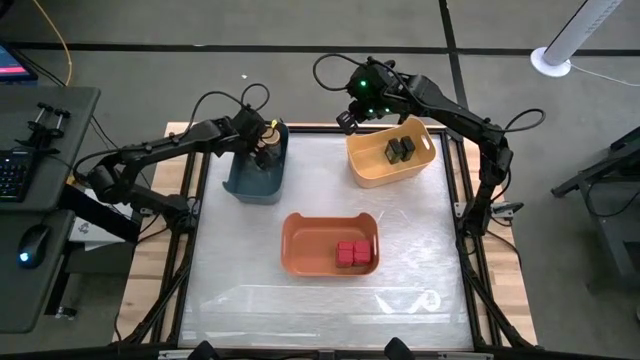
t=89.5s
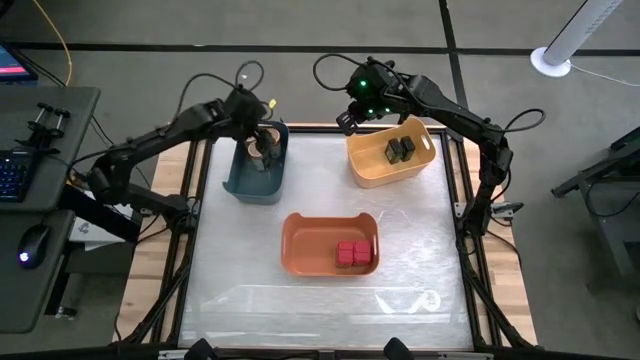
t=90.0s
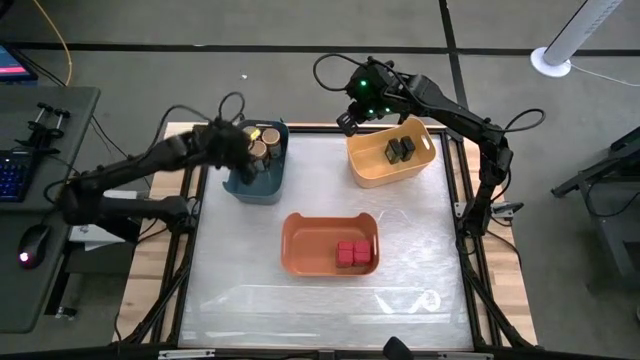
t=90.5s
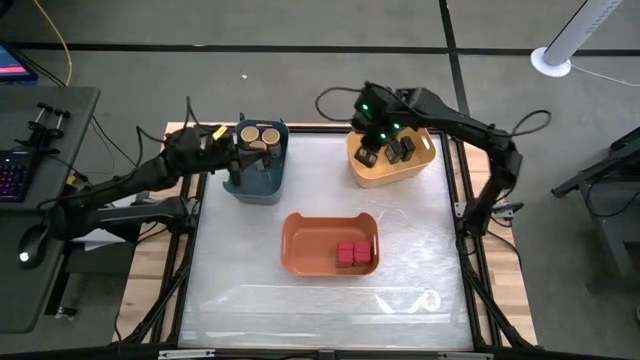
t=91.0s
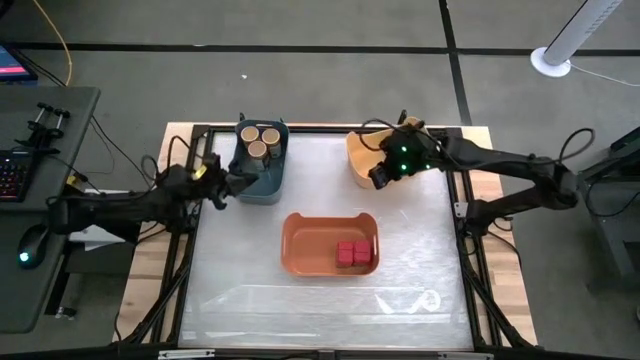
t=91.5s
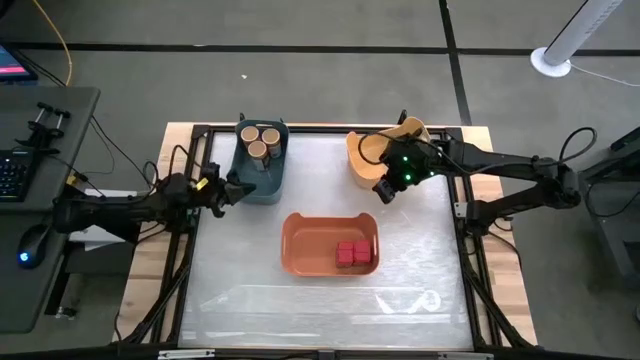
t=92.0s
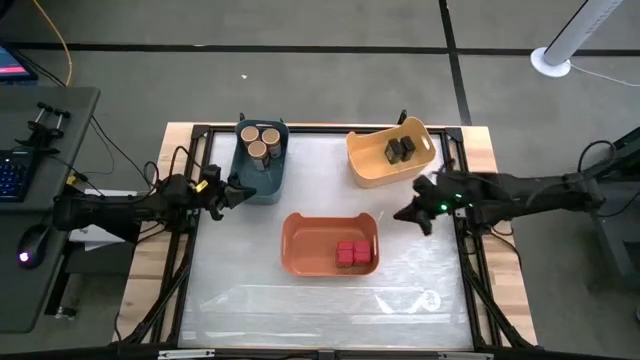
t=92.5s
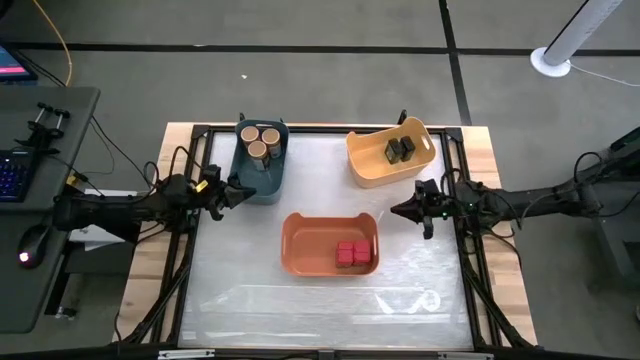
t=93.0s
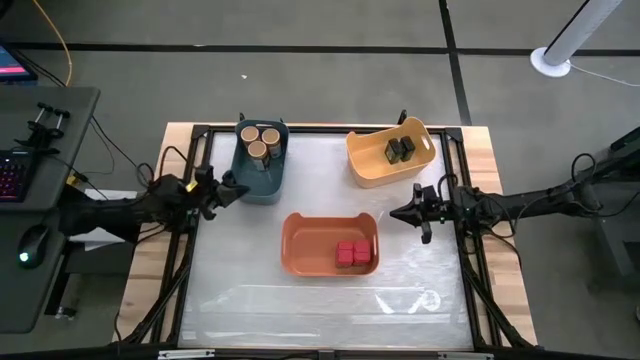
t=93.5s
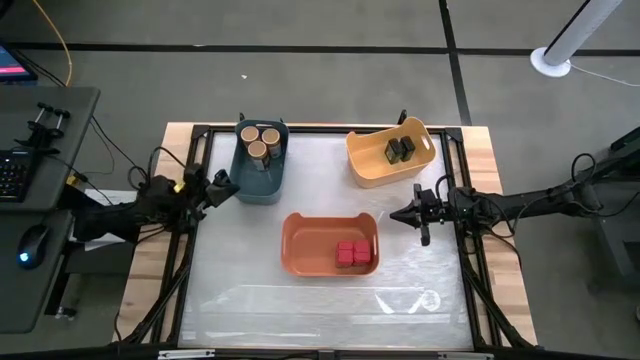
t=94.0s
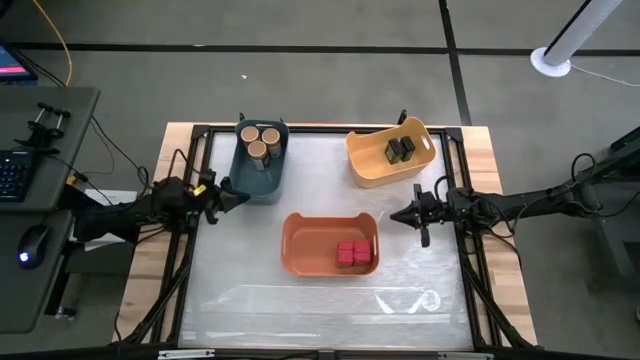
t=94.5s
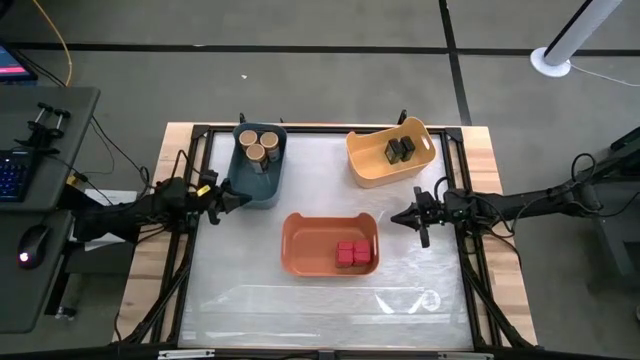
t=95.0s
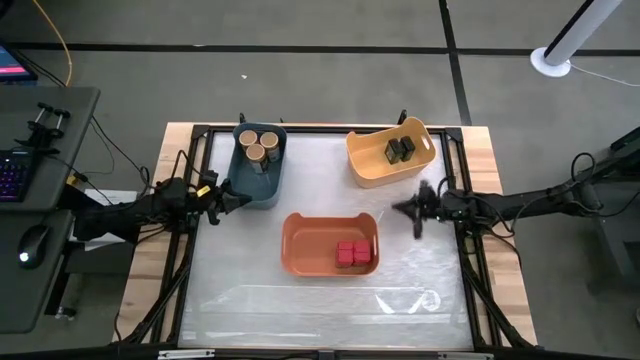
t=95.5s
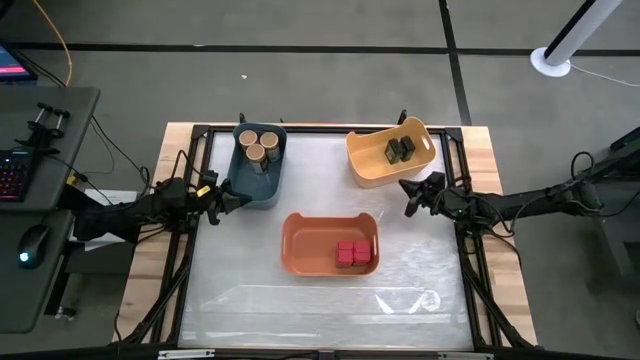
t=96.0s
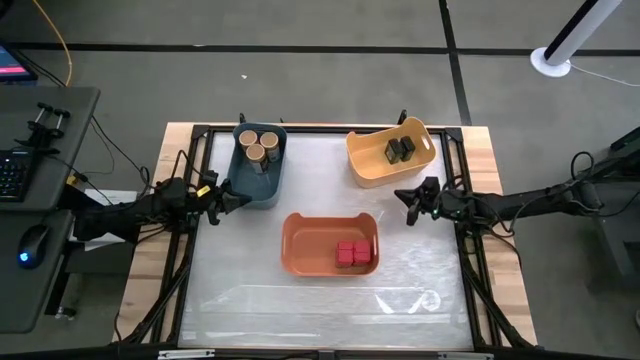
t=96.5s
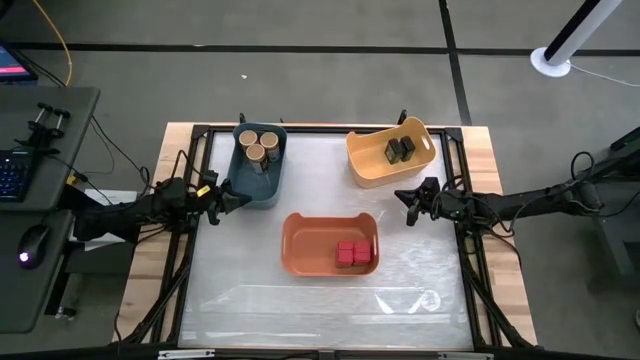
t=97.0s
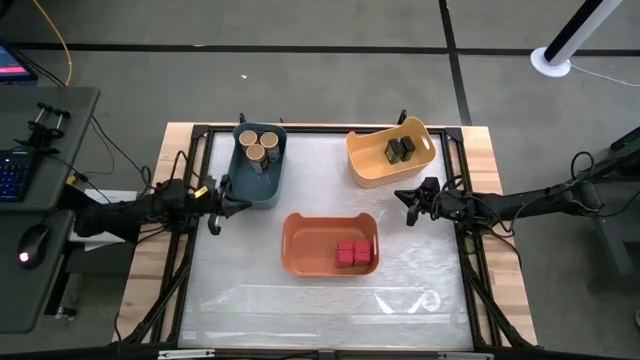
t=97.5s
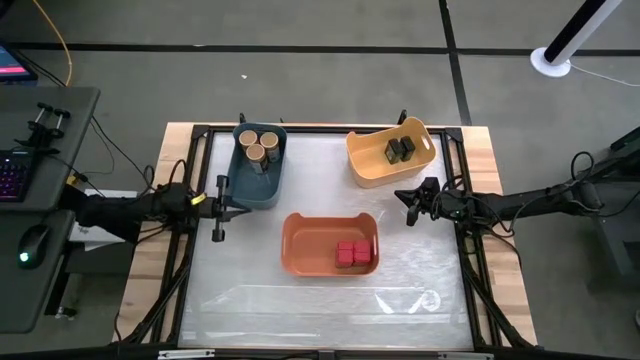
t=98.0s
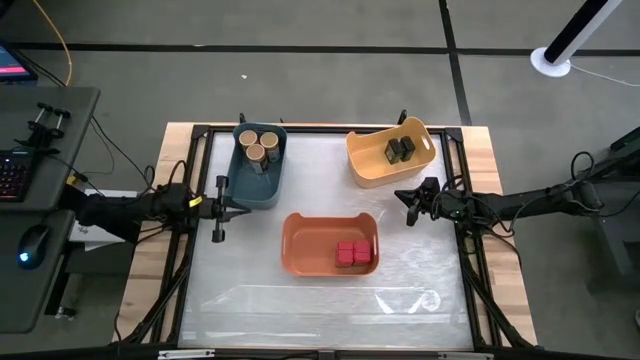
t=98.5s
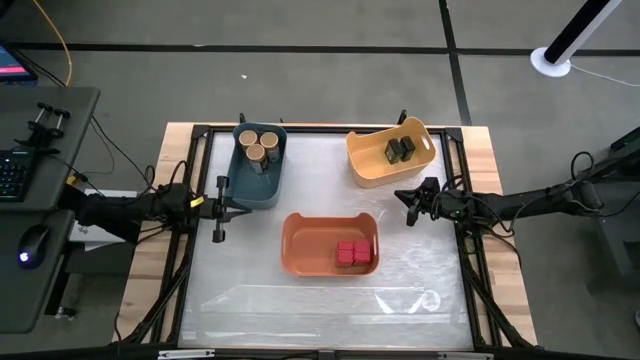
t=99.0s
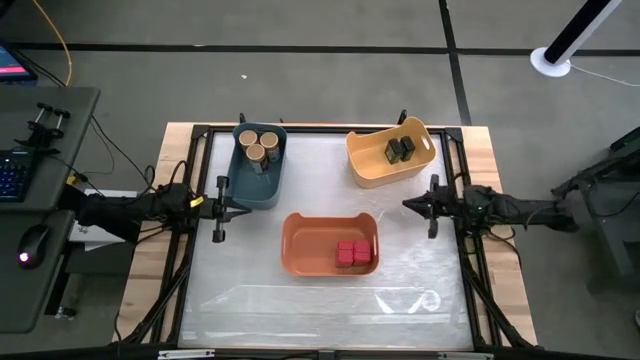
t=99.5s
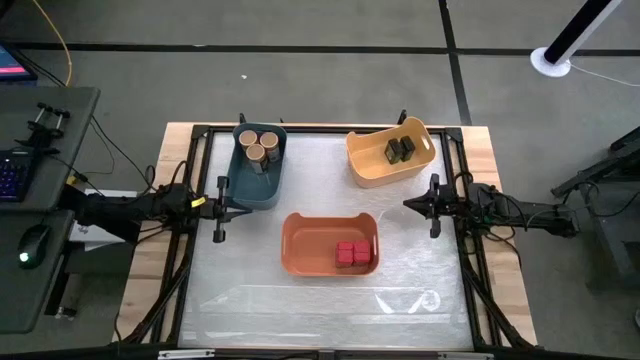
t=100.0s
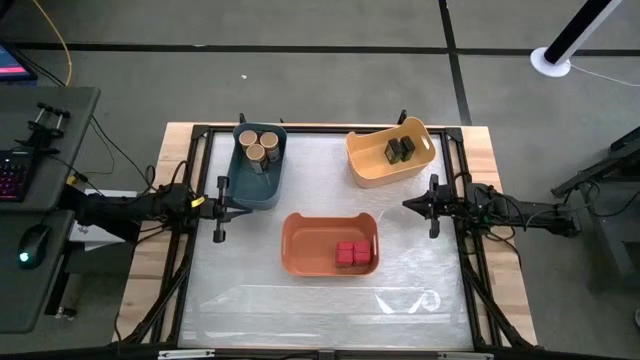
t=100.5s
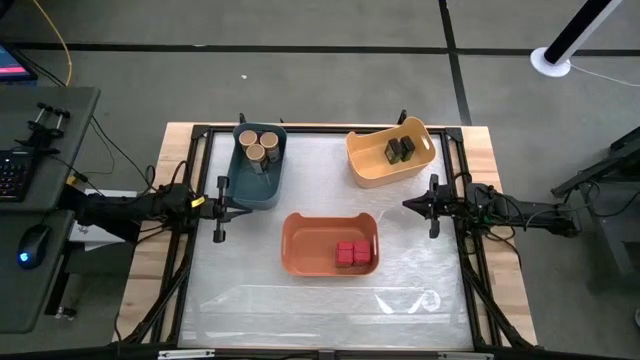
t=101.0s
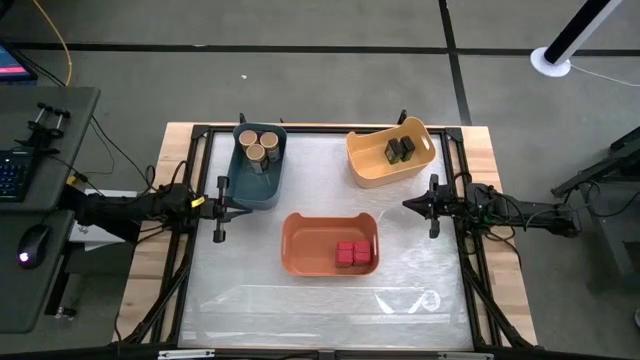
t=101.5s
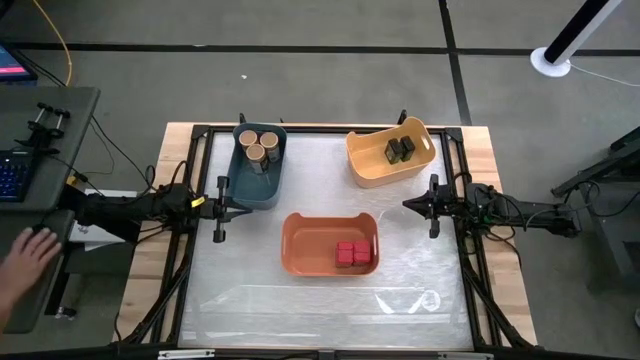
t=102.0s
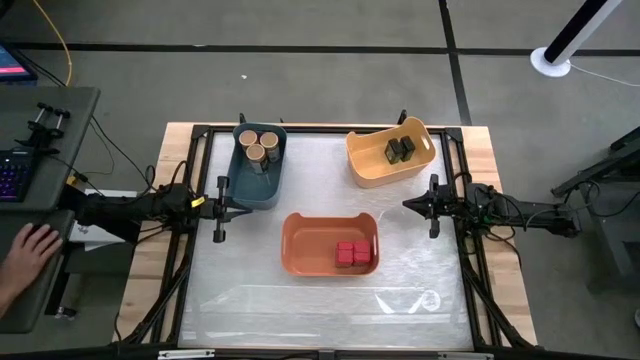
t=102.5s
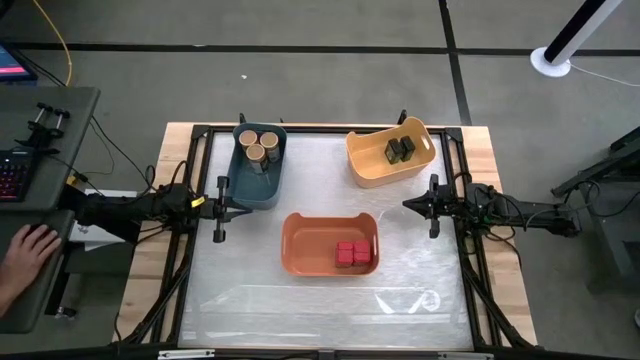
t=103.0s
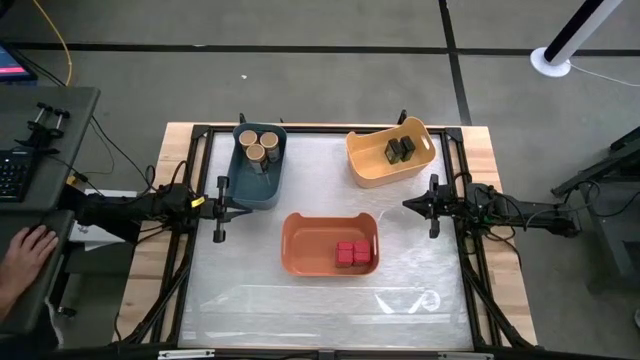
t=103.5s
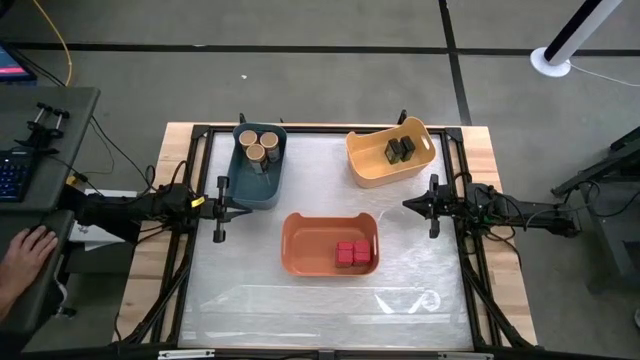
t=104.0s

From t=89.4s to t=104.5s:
Task: Sort spices by type
Return to Home Position

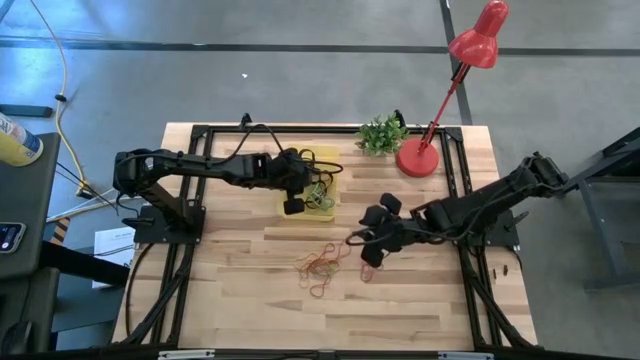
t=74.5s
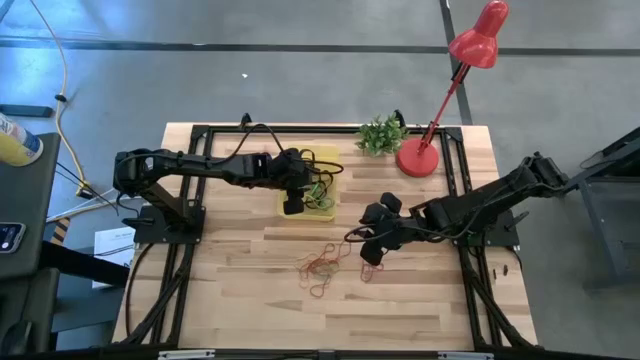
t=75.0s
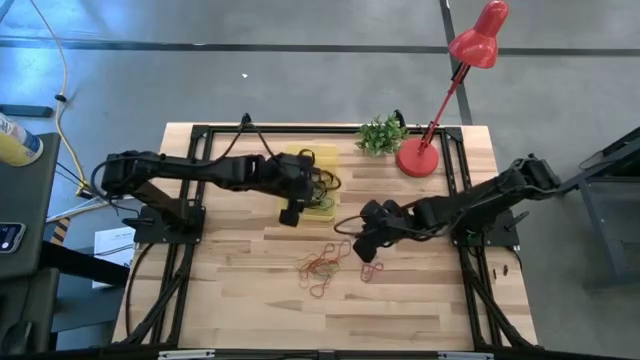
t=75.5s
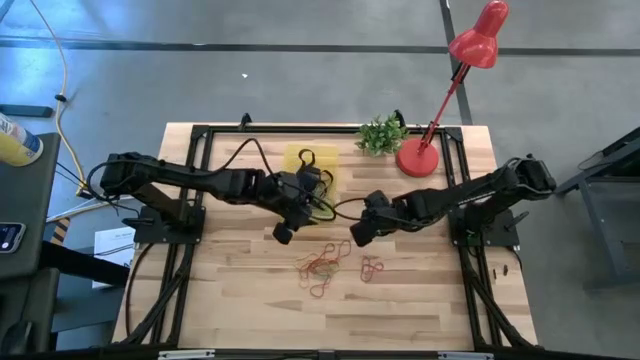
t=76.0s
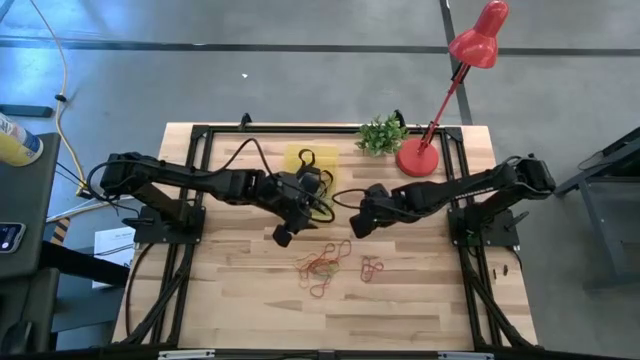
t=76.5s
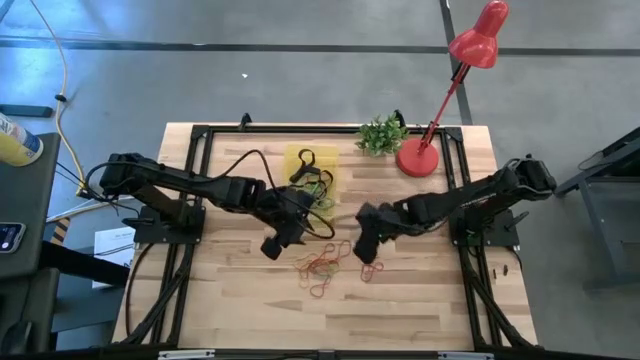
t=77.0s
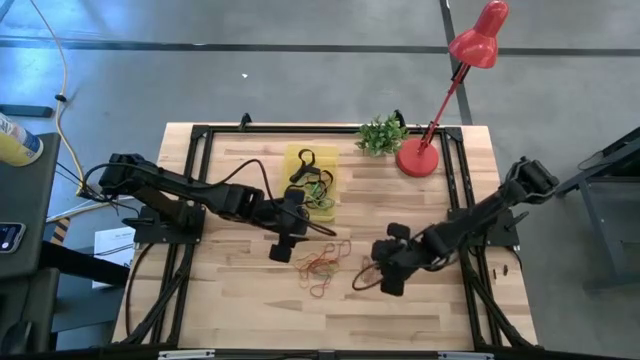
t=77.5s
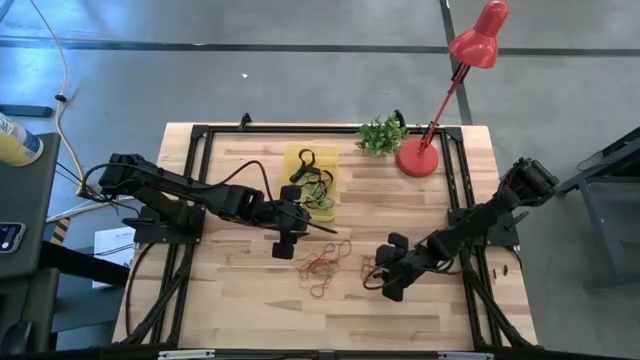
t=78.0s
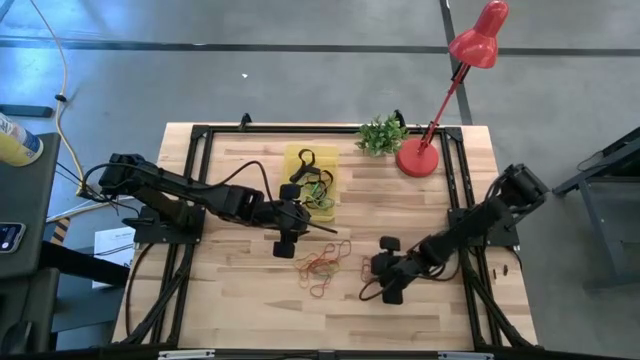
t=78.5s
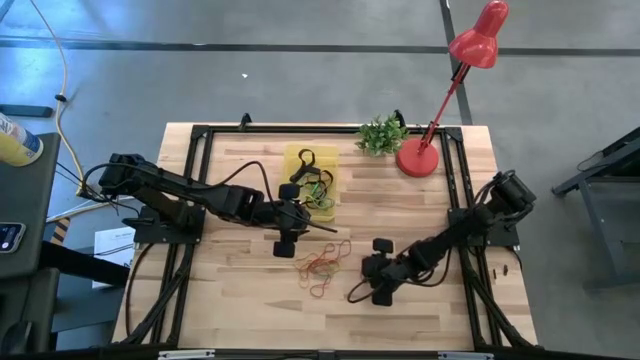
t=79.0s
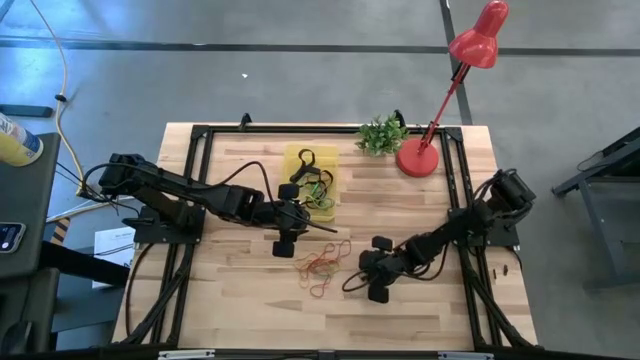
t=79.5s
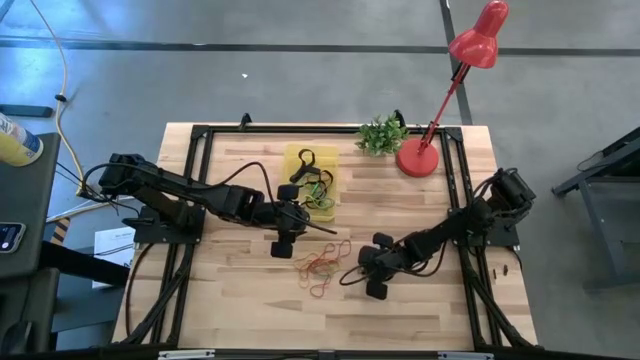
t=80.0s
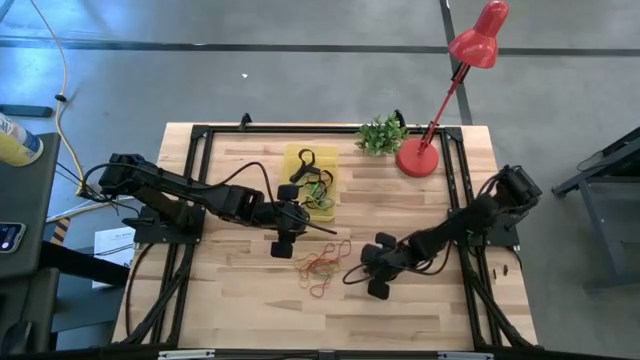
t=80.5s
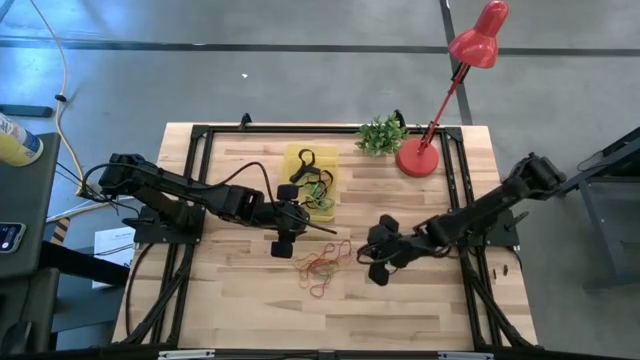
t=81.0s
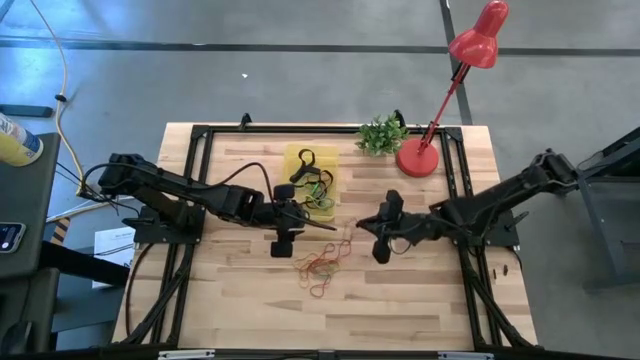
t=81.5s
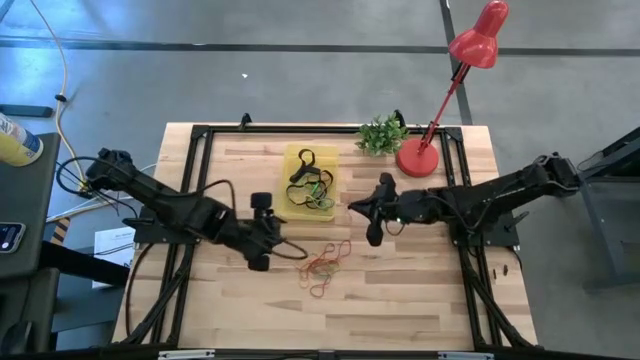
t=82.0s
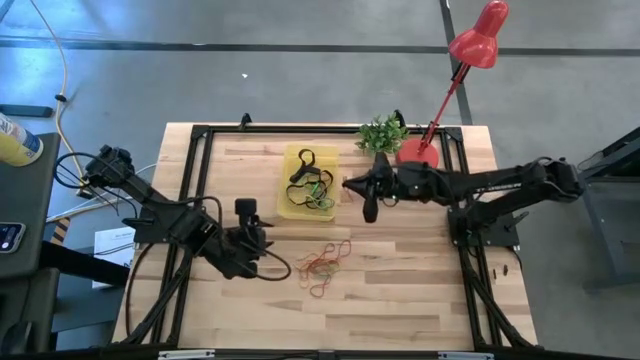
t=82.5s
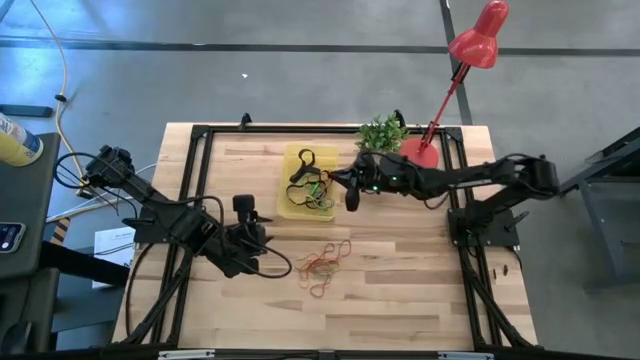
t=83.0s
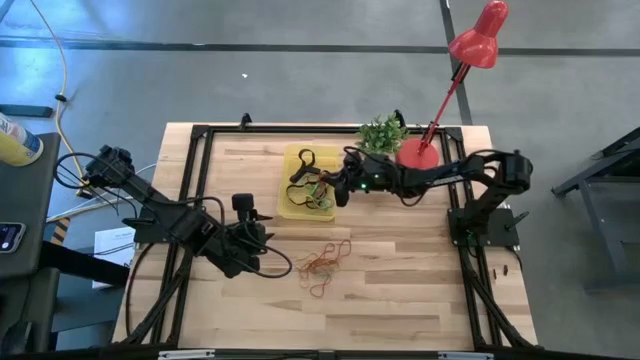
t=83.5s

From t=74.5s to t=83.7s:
Task: Pick and place rubber bands into bin
Put the red rubber band into the yellow bin
